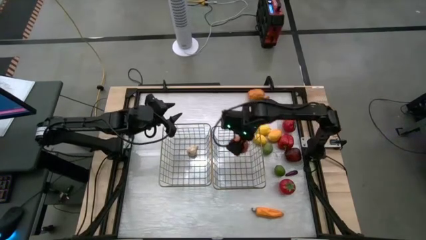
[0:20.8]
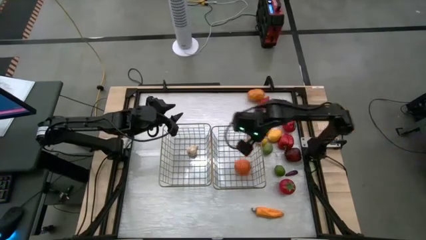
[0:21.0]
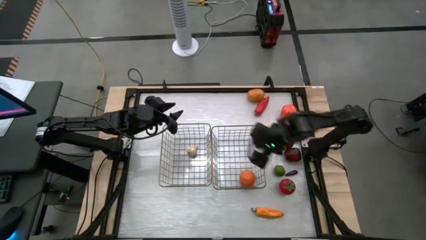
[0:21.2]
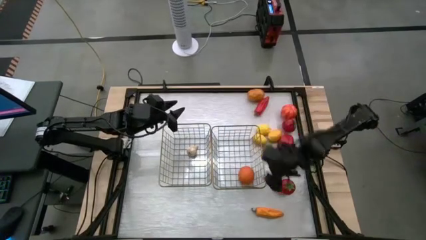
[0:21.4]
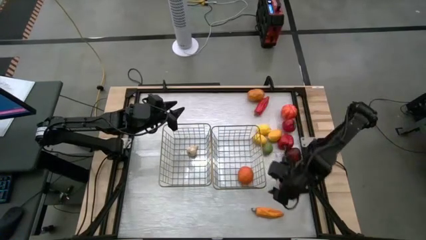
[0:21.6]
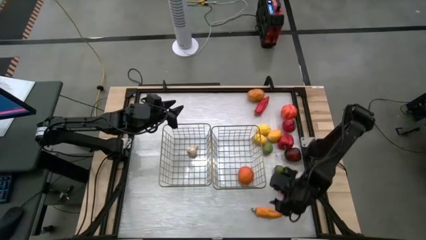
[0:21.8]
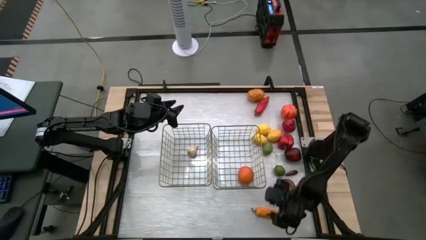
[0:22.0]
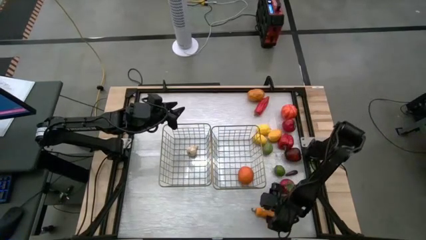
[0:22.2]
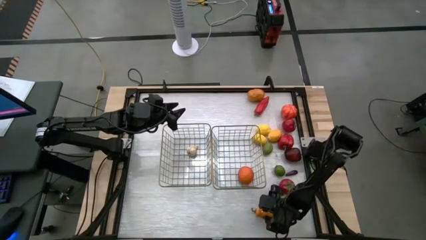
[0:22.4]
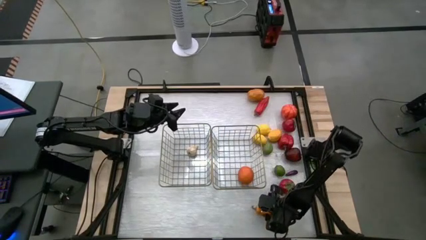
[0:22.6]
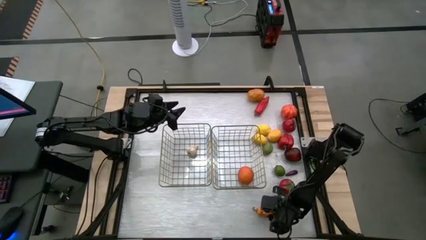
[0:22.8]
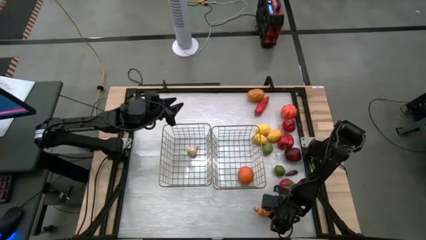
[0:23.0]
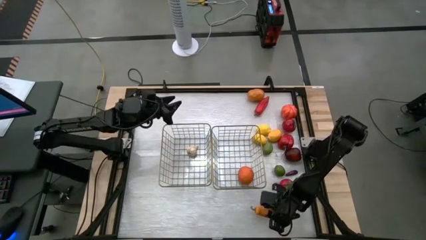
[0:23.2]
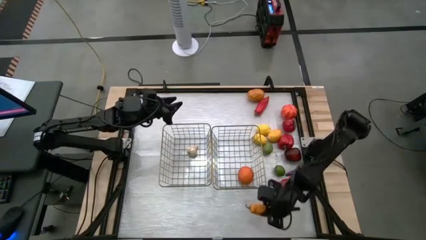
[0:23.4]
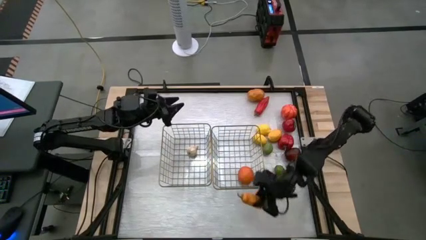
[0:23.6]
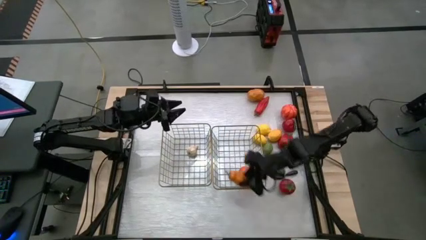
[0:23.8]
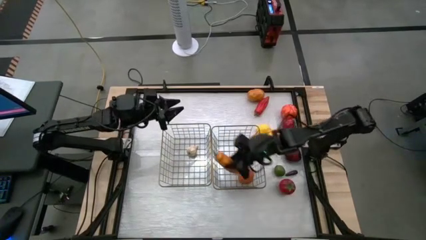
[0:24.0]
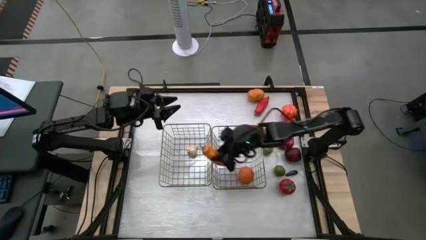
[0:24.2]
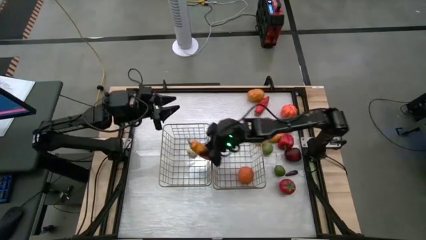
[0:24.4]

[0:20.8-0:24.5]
Task: Sort produce into baskets
Put the yellow chili pepper into the left basket

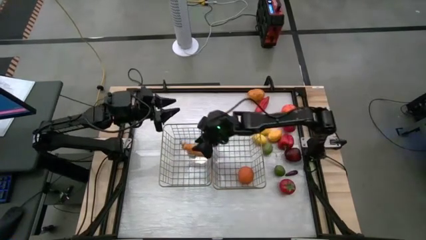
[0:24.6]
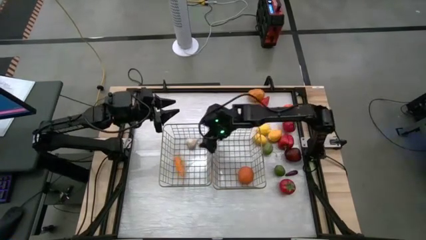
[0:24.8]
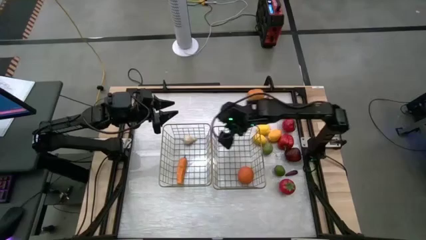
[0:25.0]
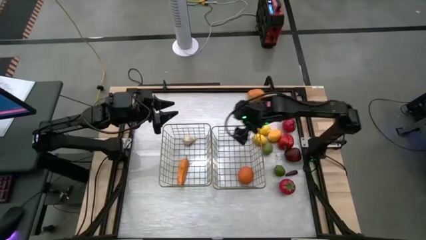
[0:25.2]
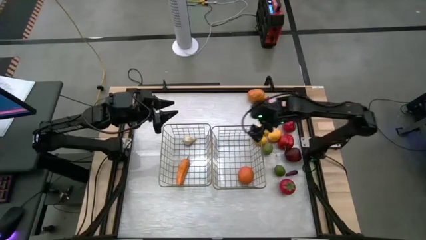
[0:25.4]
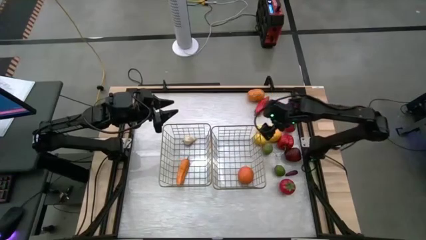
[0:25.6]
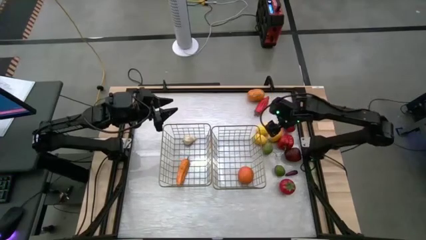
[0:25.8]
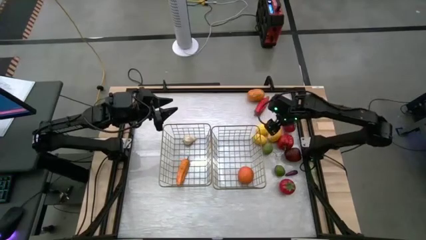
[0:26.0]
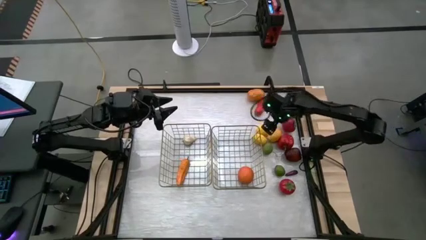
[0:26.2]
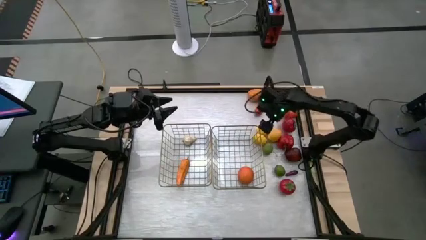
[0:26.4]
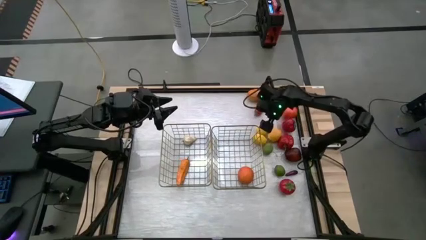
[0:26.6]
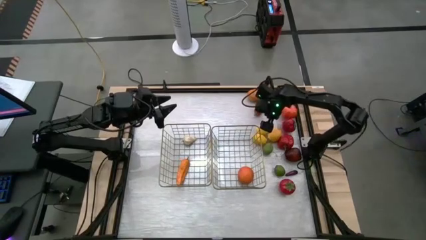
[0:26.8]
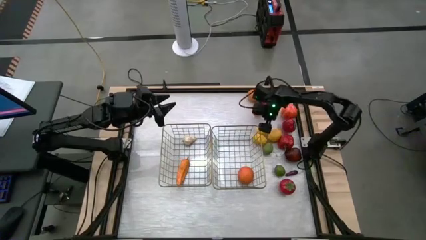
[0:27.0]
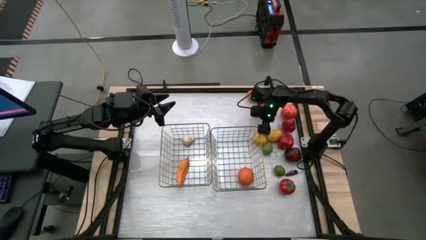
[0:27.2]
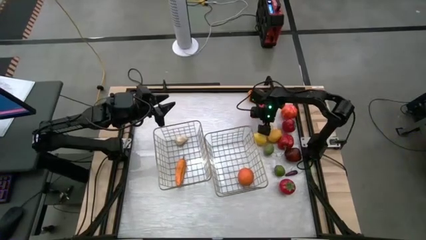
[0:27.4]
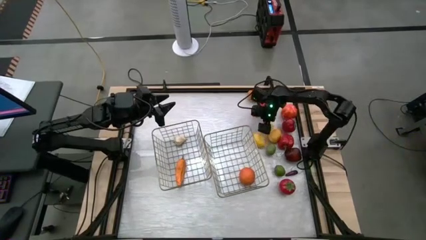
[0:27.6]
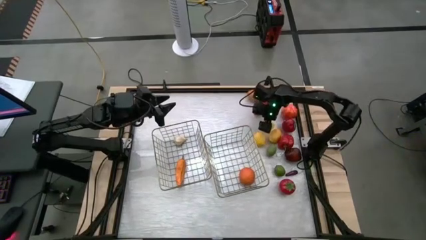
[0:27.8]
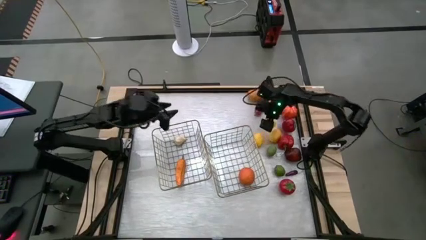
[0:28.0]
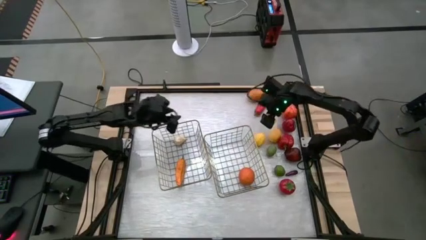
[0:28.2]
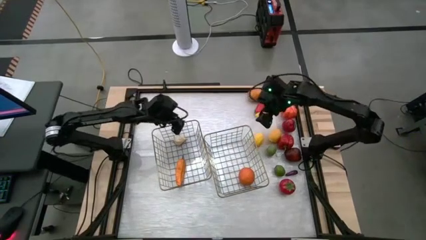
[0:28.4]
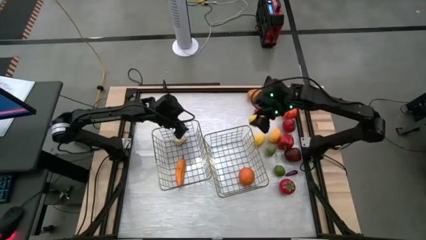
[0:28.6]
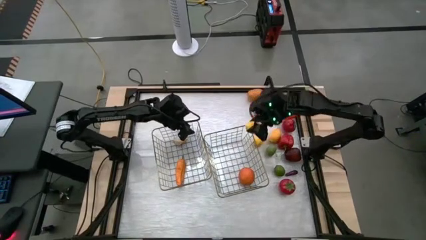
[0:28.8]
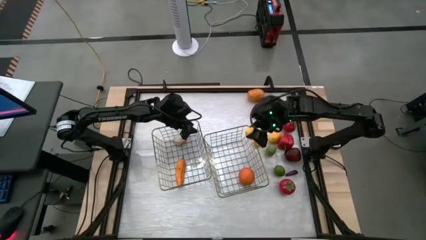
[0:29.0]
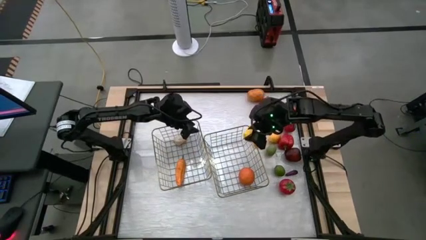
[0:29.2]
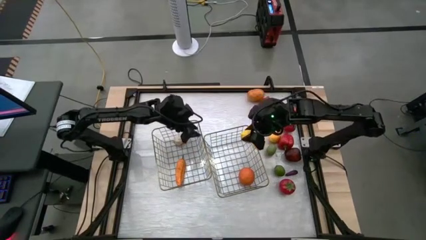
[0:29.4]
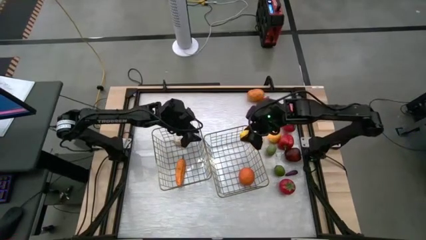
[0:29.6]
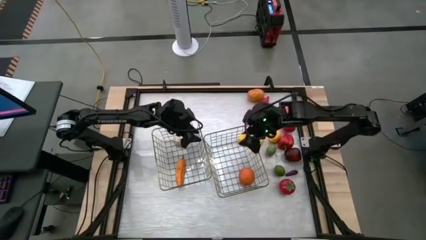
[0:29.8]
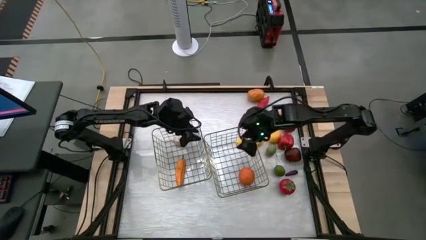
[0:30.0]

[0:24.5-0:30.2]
Put the top yellow lemon into the right basket

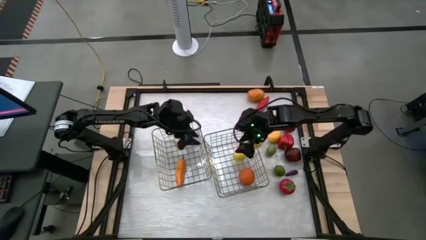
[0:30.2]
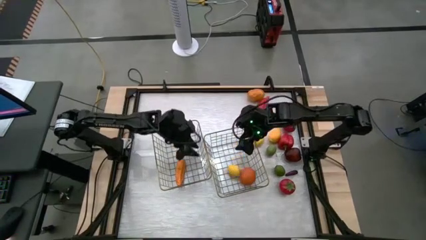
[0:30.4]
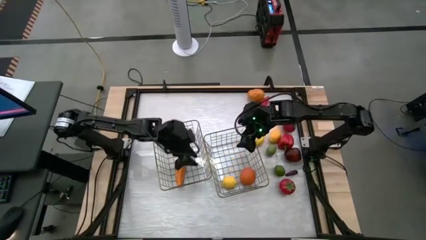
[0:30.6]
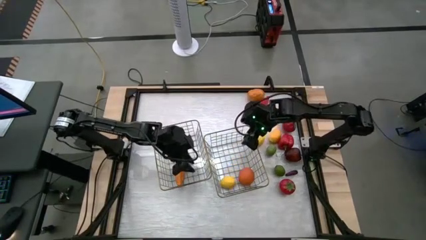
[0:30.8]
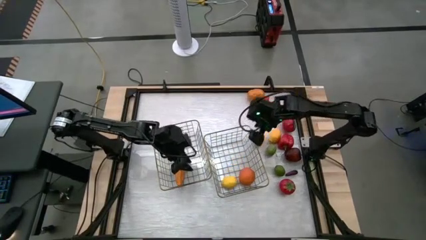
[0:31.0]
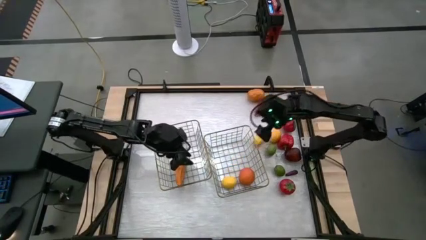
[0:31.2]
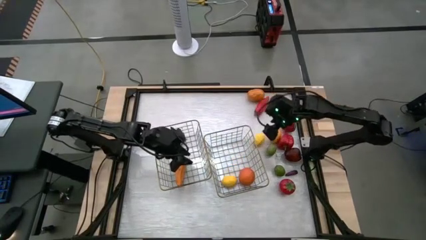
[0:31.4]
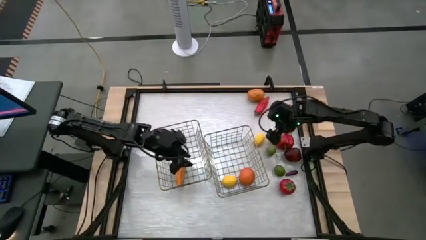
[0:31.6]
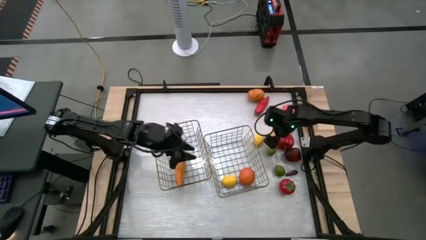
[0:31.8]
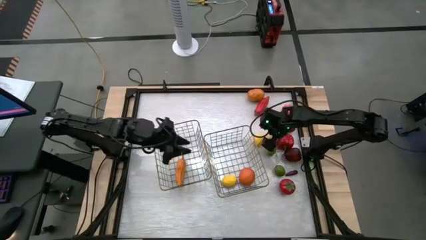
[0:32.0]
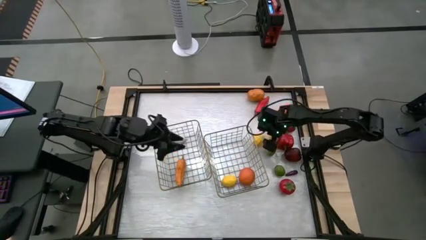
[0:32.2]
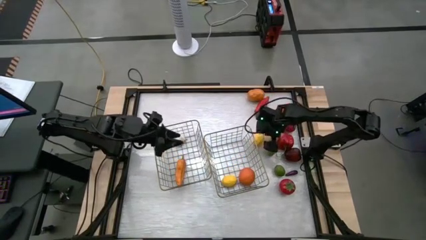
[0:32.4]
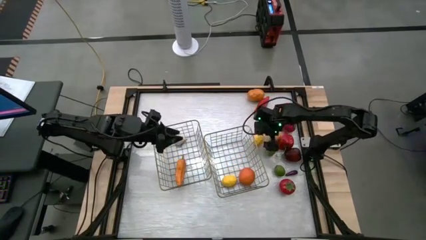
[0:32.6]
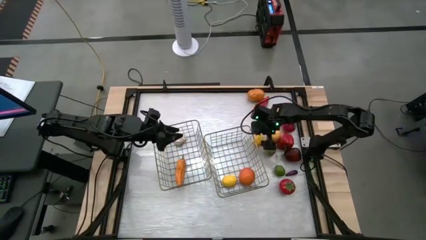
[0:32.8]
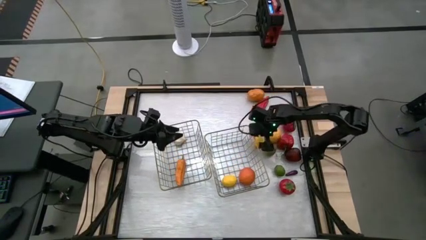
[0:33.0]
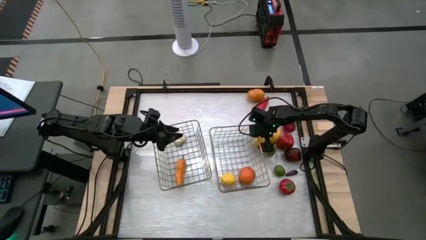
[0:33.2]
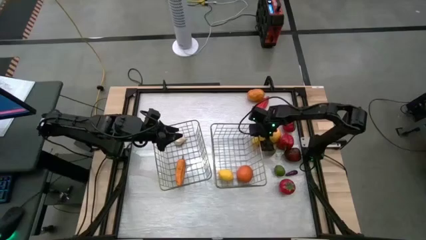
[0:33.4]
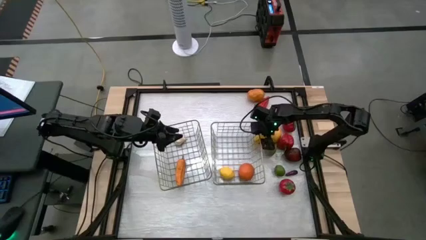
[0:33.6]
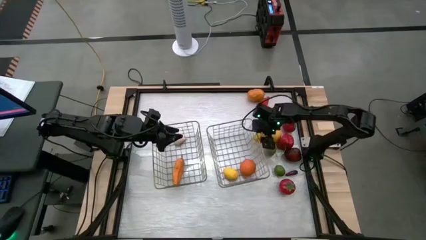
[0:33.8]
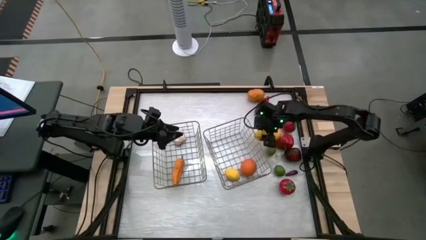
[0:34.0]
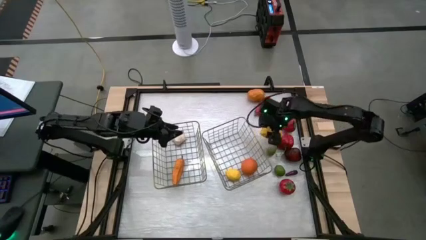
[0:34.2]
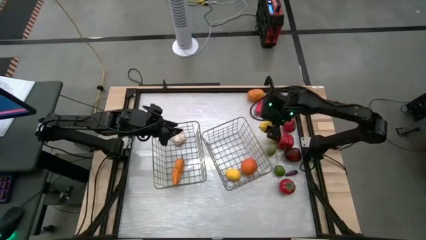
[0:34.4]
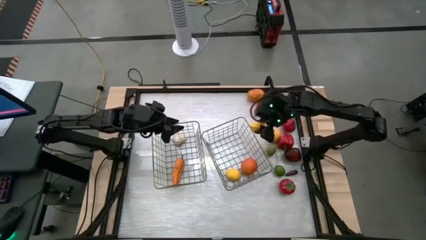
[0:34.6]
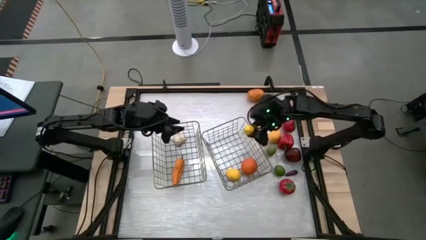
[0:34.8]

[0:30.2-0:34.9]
Put the left yellow lemon into the right basket

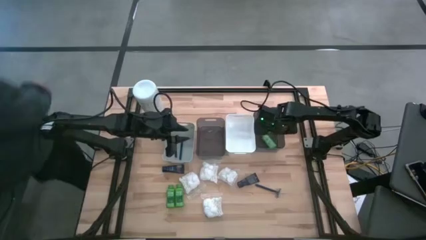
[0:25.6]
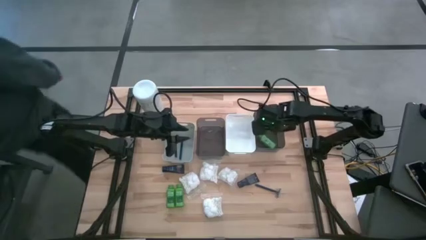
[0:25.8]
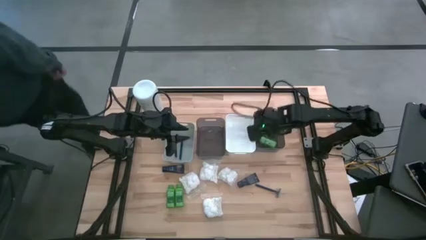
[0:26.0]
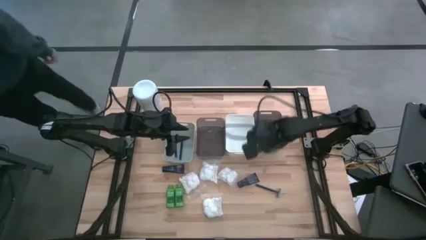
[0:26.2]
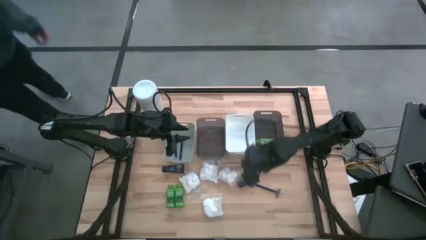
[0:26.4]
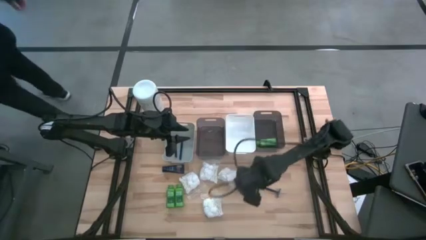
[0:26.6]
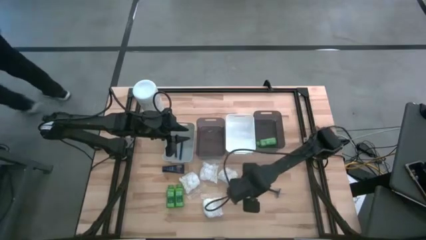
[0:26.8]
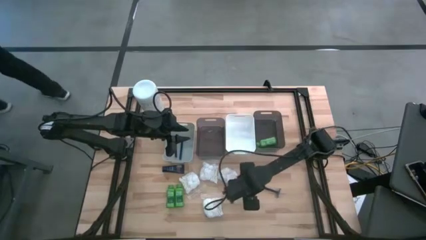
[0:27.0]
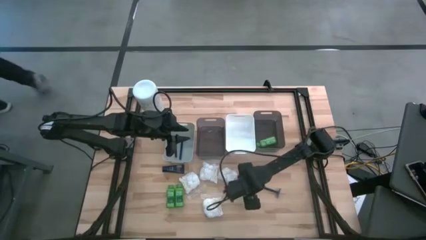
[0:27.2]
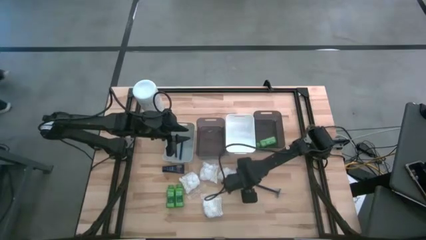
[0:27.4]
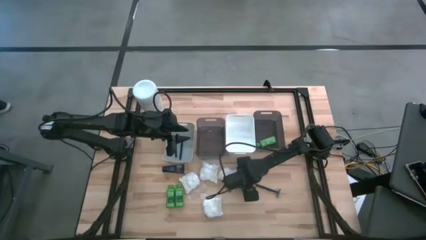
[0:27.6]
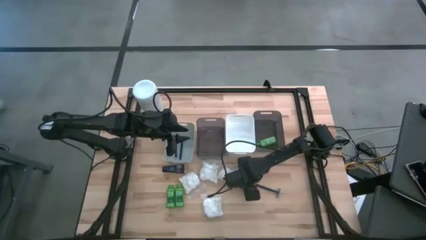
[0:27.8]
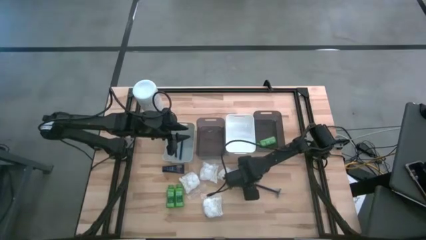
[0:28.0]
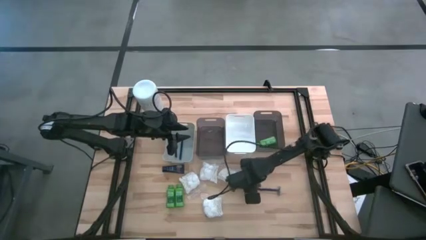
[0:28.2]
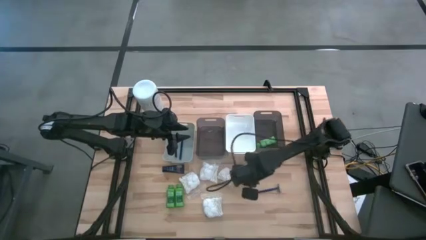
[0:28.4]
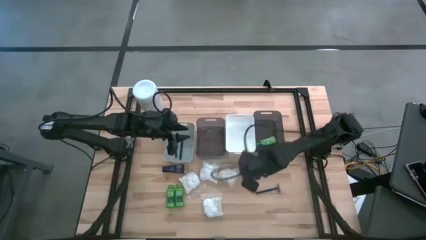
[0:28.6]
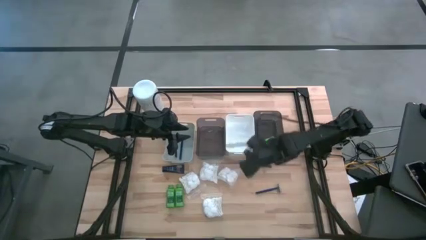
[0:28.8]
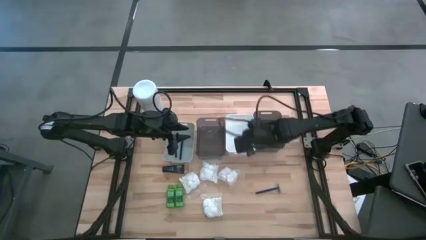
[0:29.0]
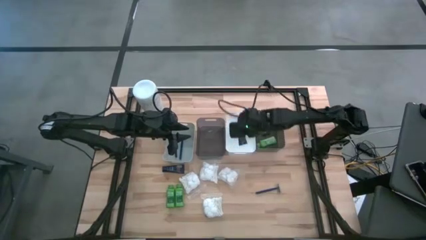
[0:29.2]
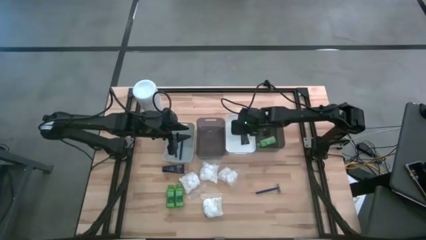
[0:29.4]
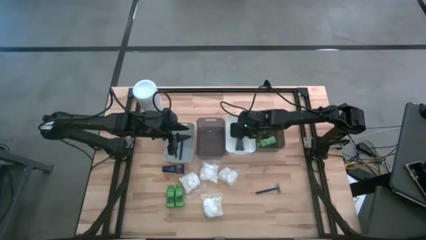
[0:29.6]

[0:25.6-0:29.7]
Task: Pick & Place Travel size toiletries
Put the right shave cream into the white bin
